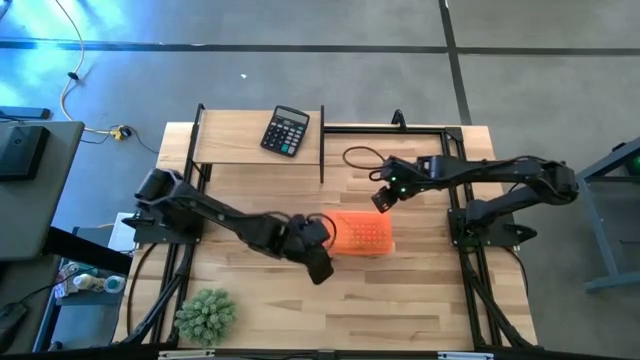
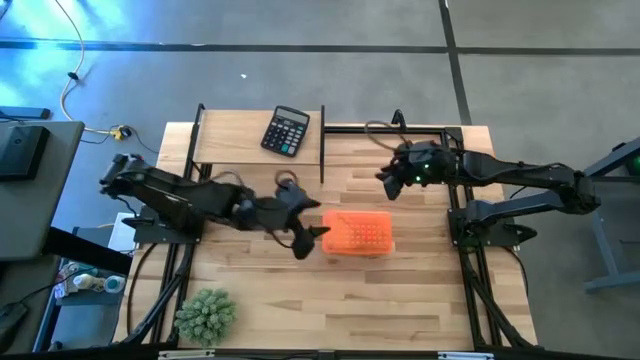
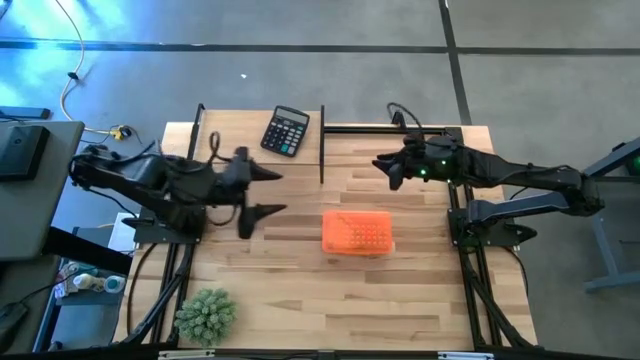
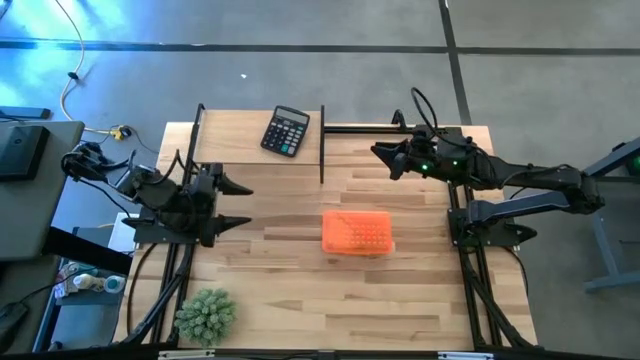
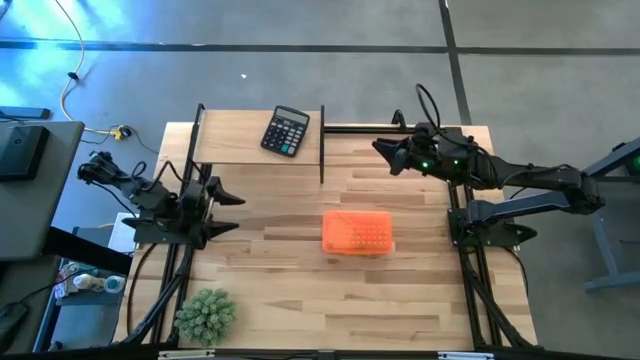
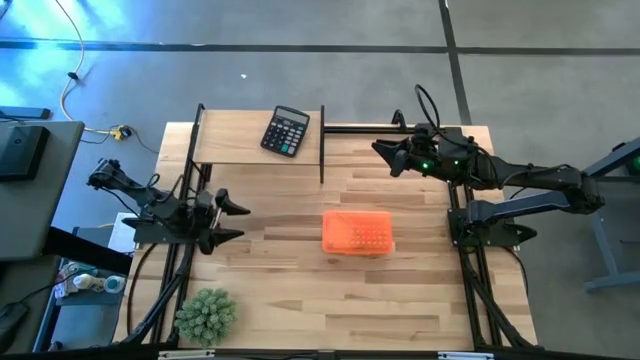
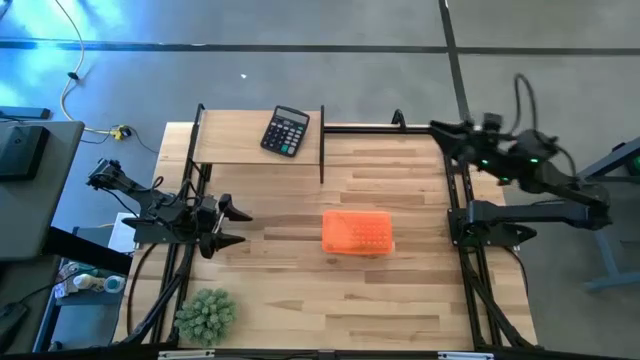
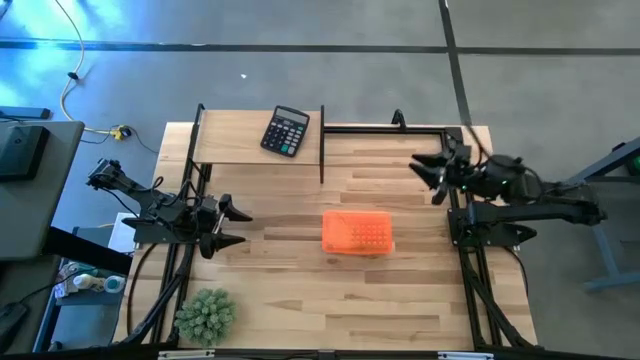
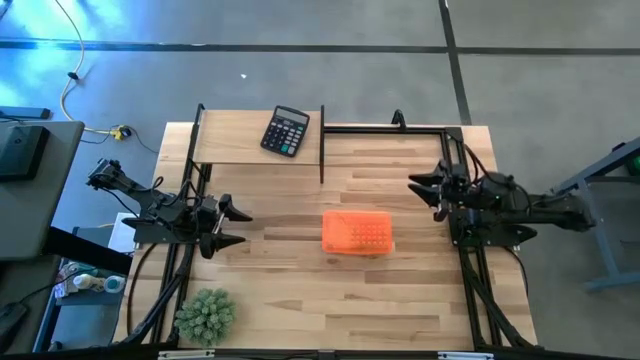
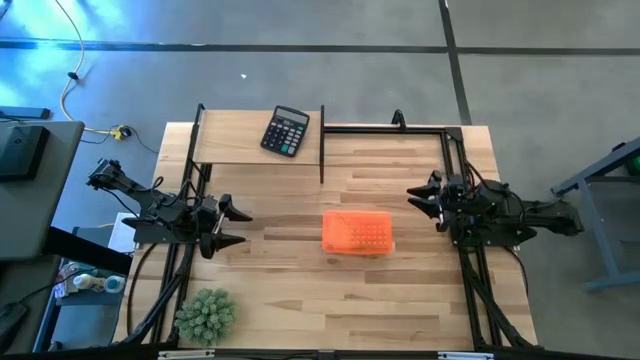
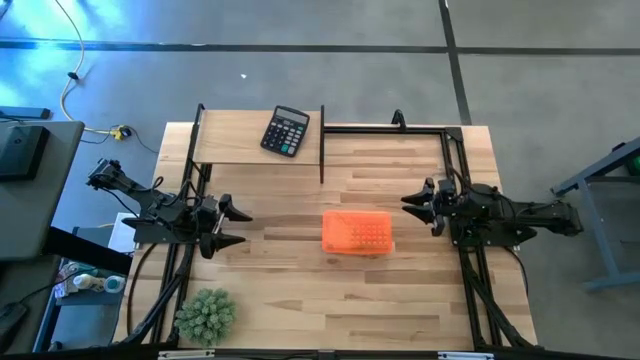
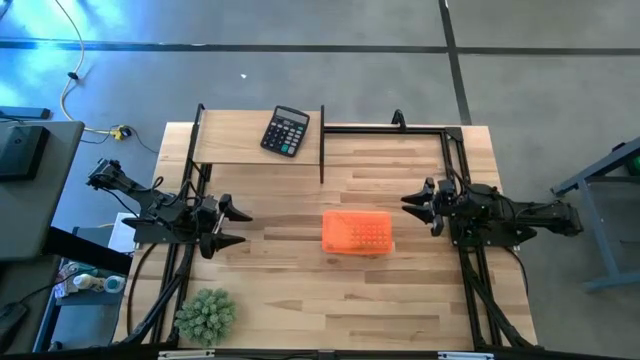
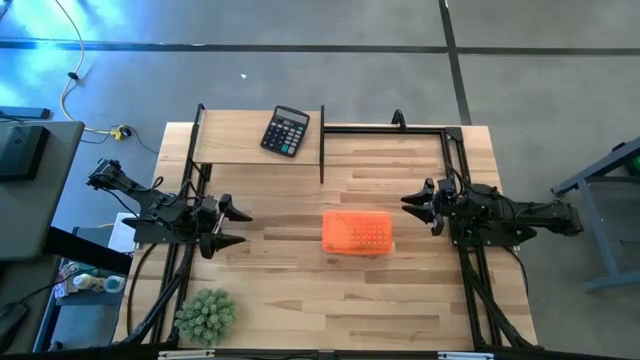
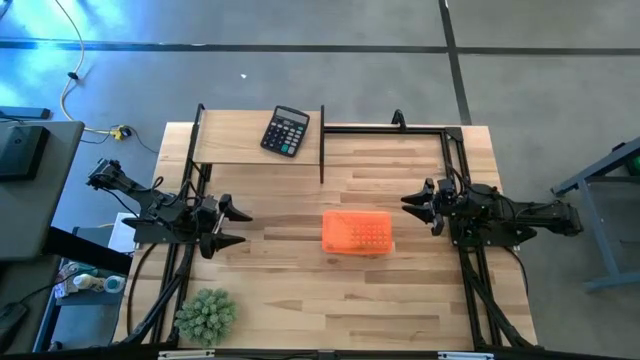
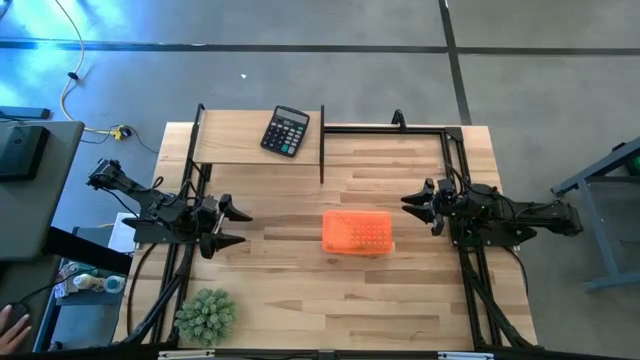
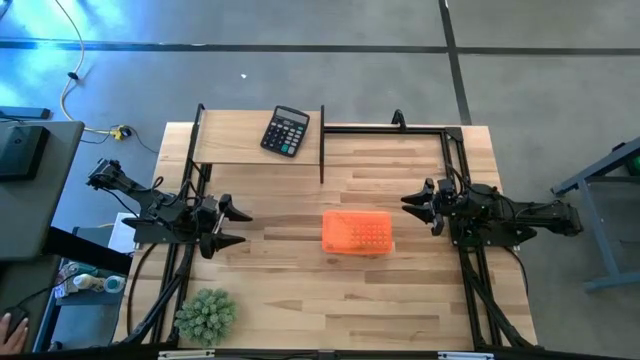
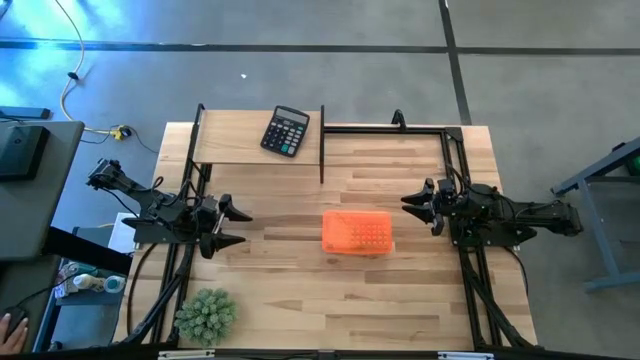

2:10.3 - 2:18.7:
Task: Pack school essentials
Return to Home Position

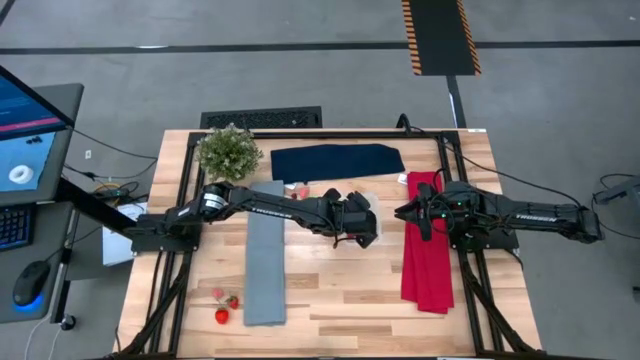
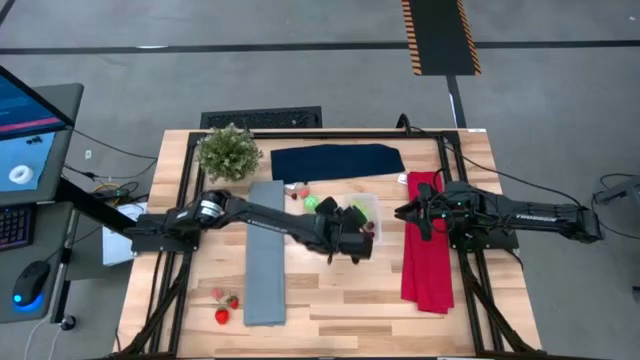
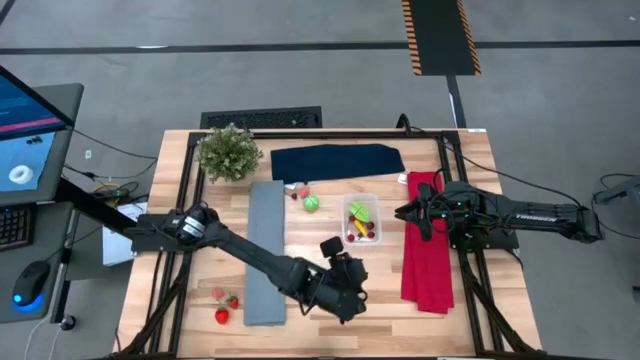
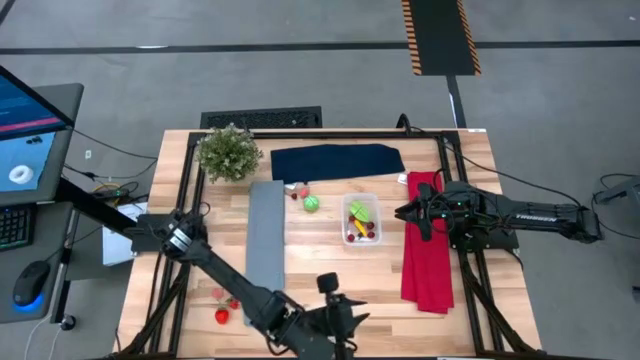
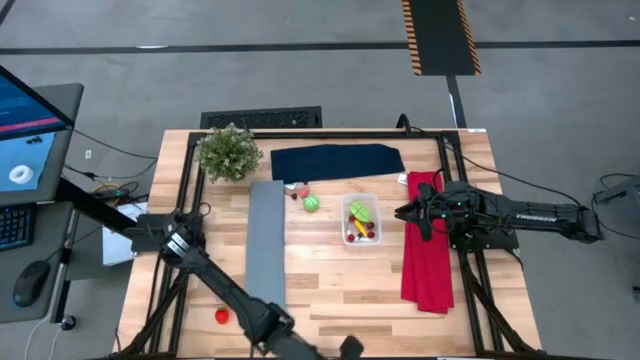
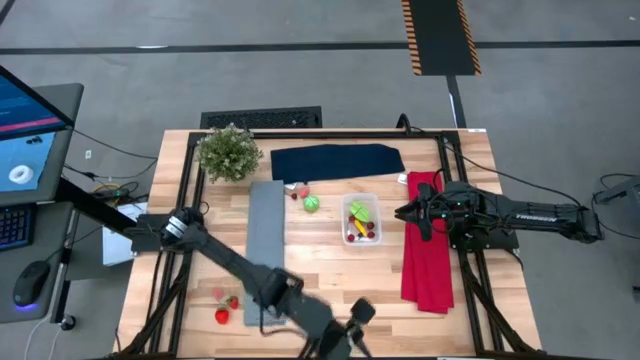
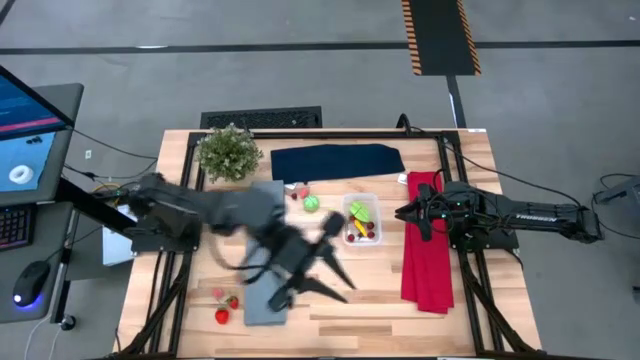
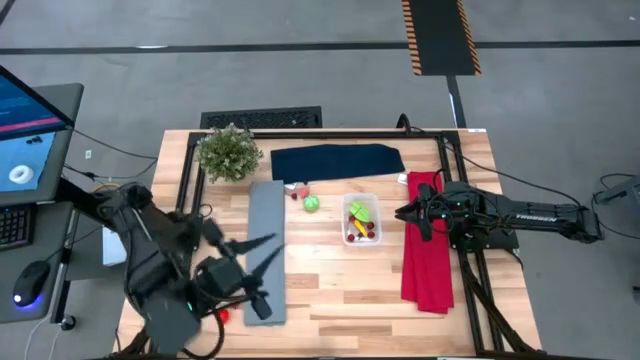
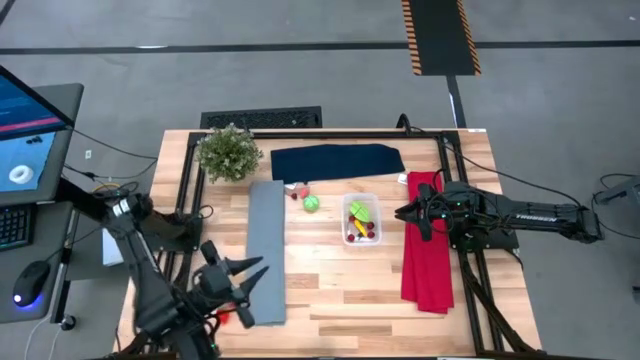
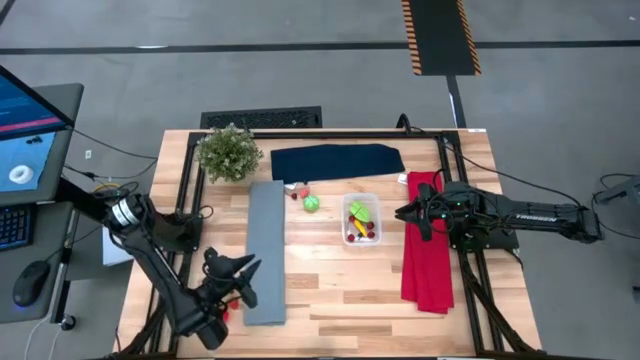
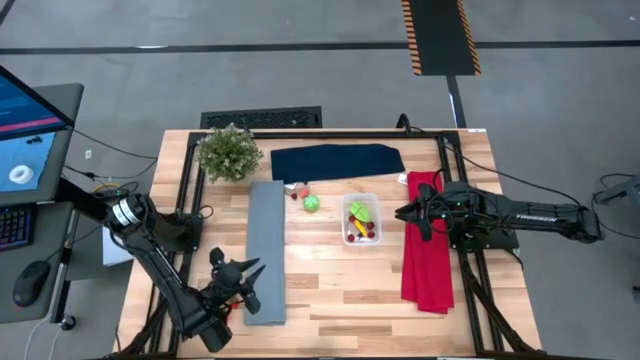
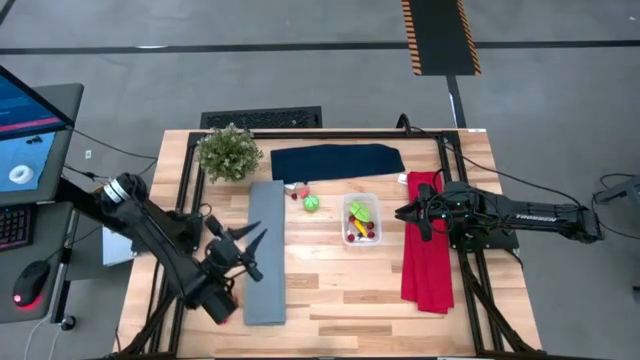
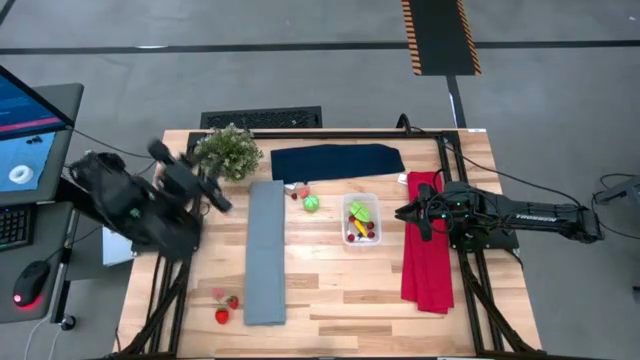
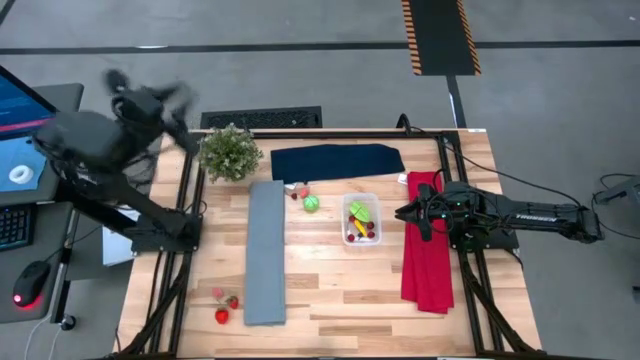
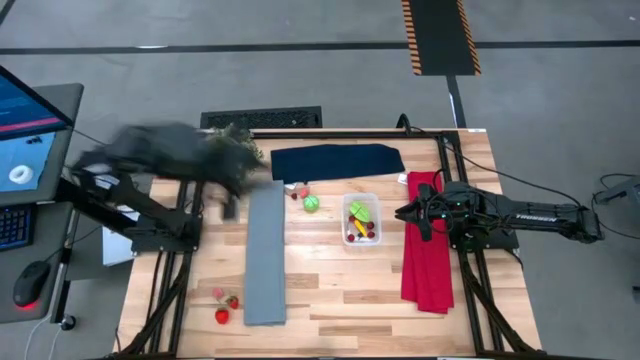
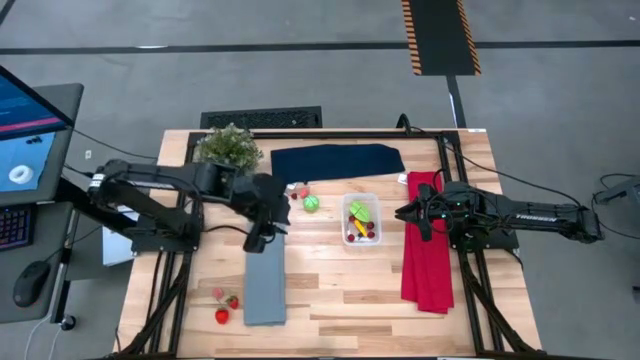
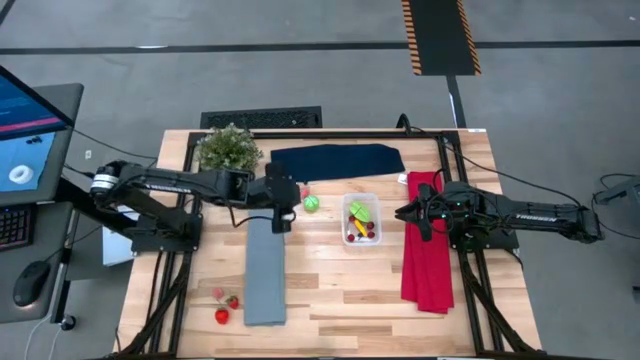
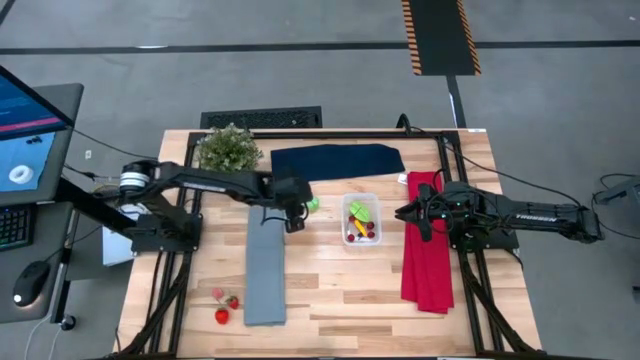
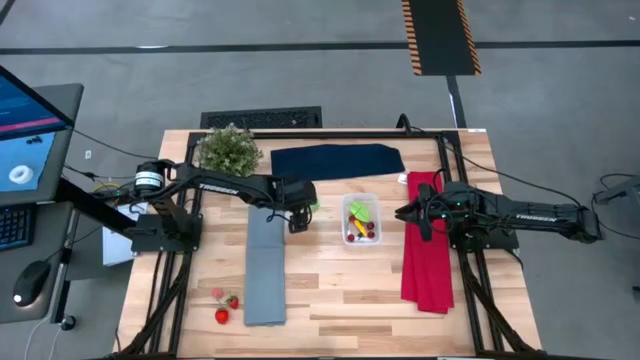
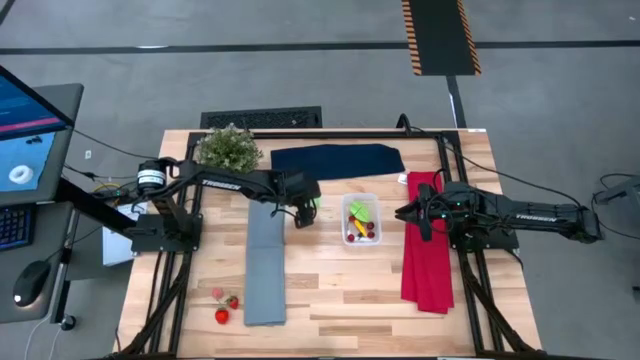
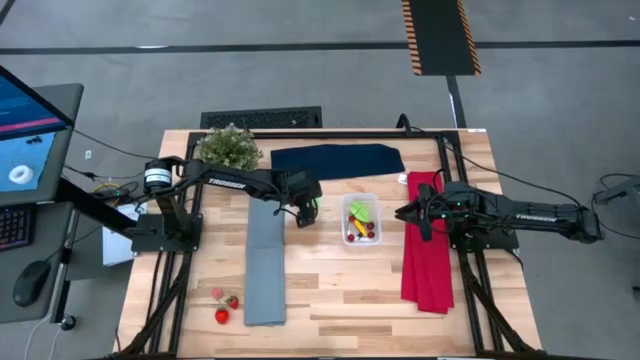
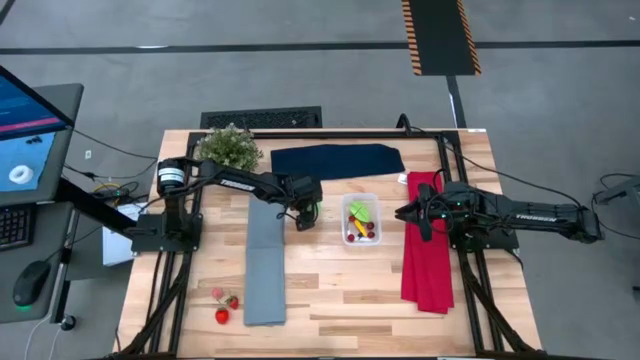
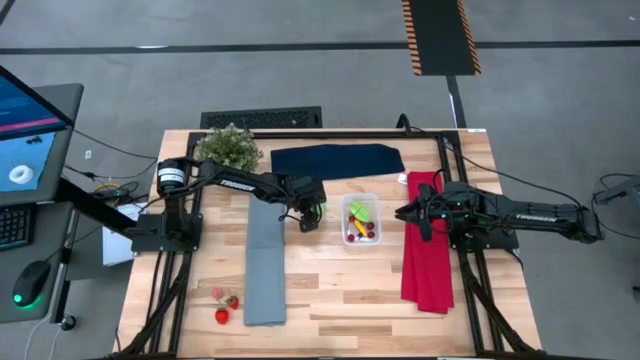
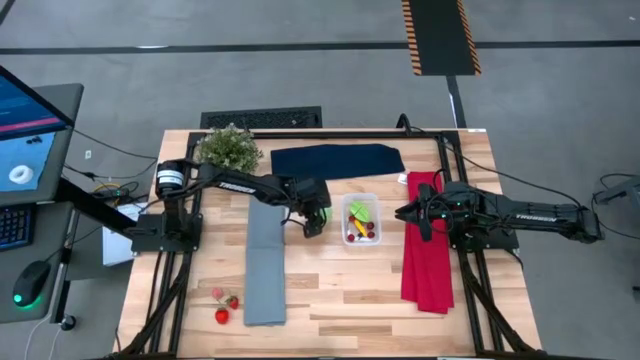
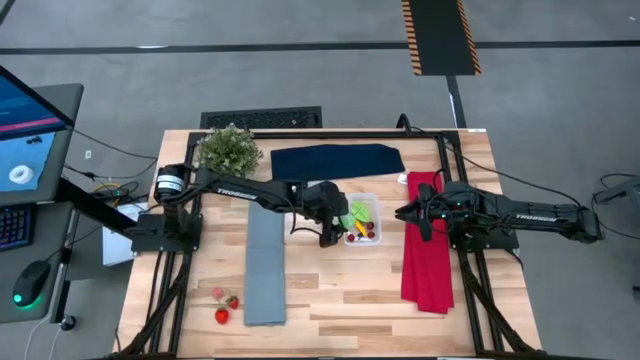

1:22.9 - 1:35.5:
Task: Pick and placing Produce into tupperware
Put the green cabbage into the transparent bin
